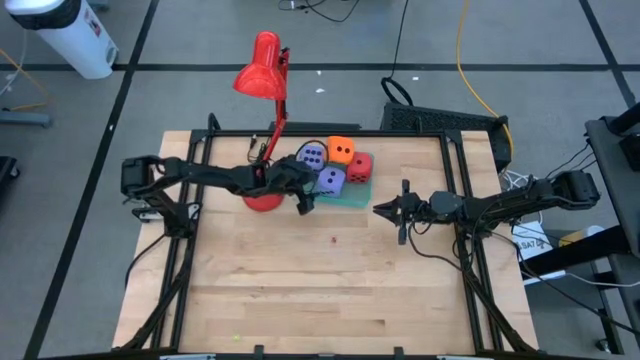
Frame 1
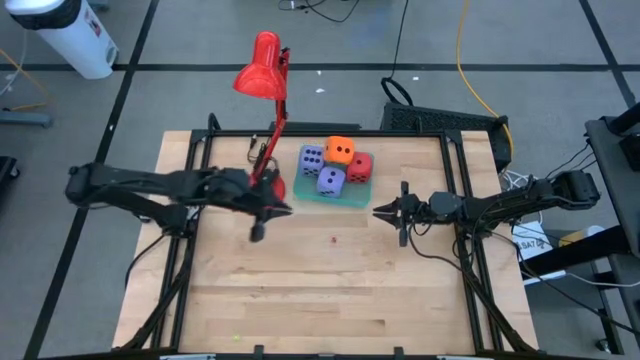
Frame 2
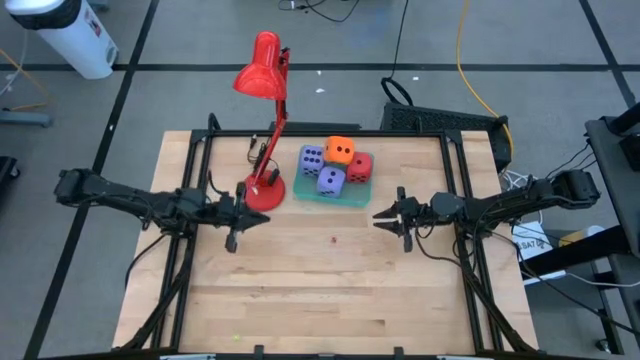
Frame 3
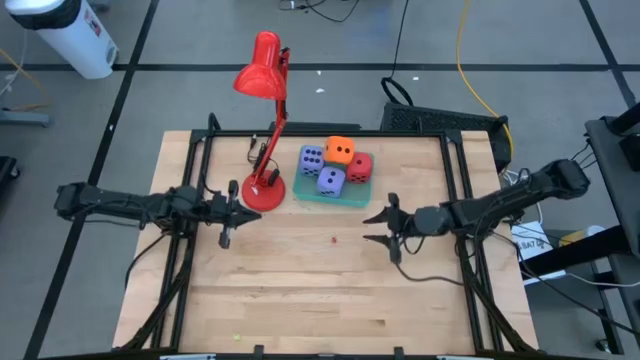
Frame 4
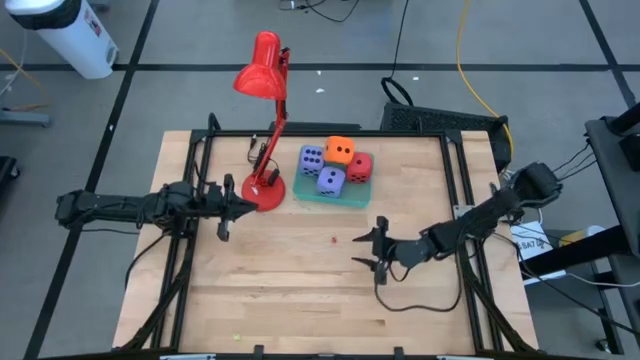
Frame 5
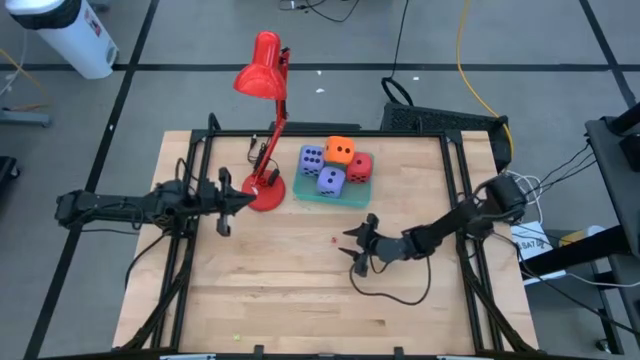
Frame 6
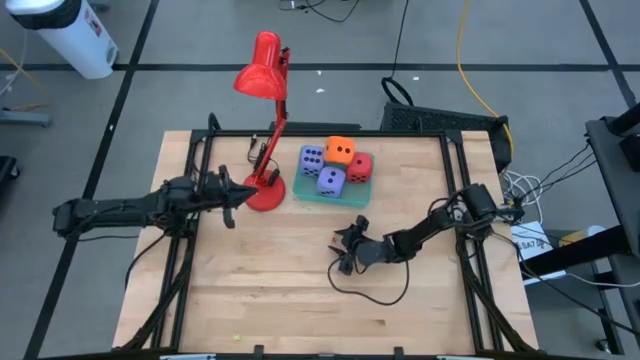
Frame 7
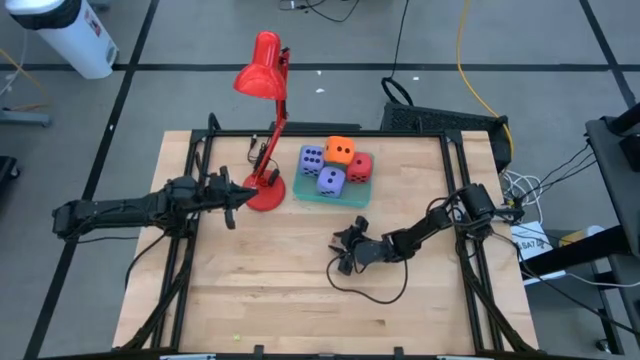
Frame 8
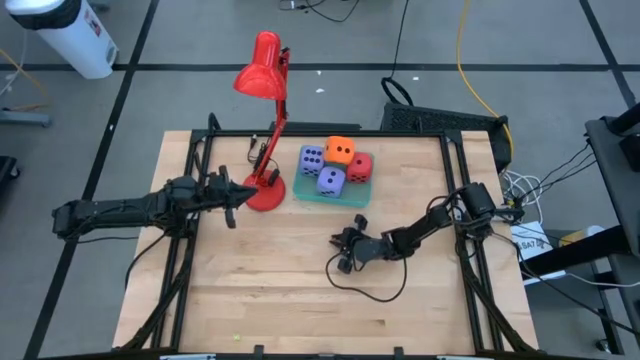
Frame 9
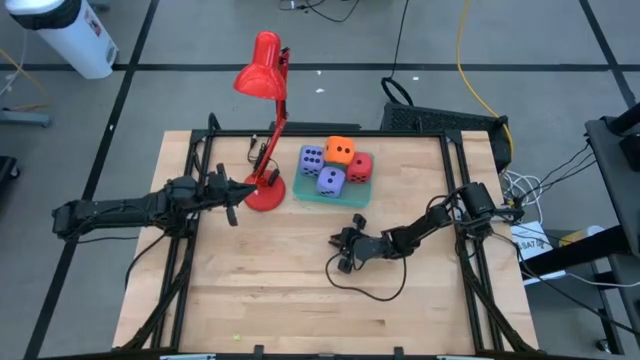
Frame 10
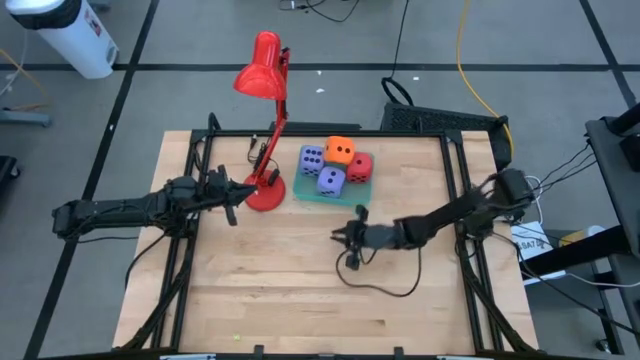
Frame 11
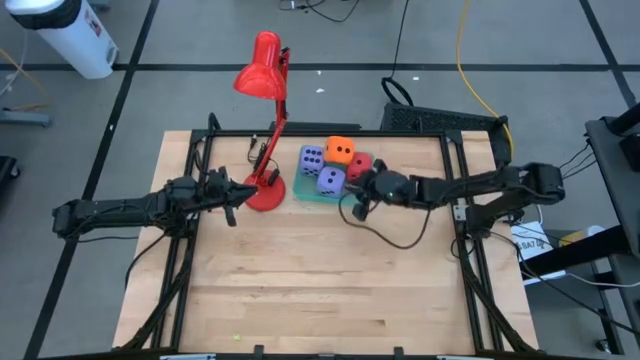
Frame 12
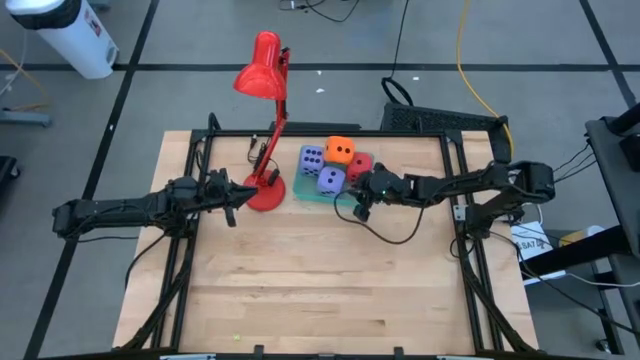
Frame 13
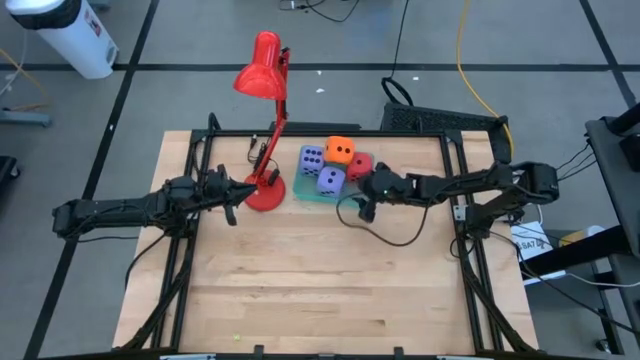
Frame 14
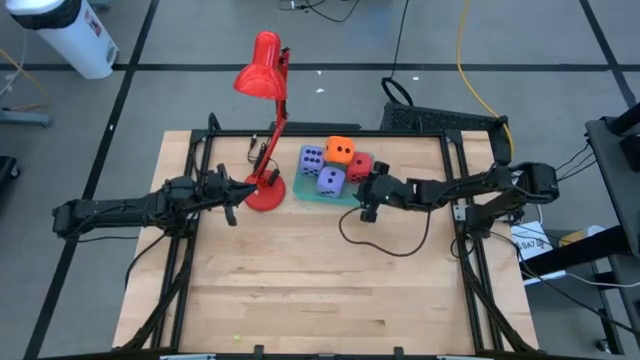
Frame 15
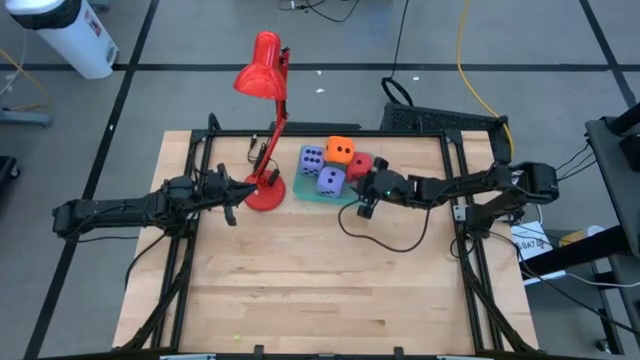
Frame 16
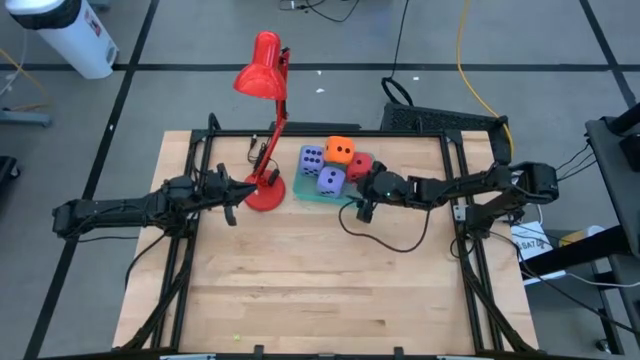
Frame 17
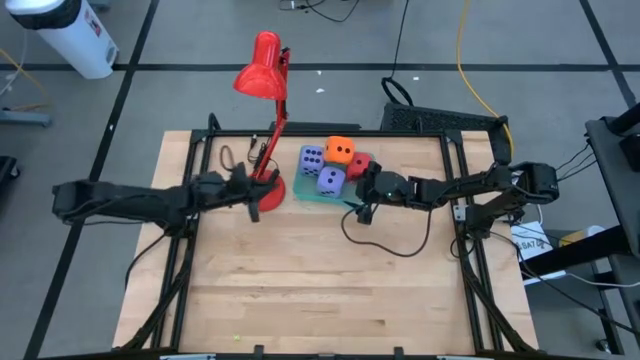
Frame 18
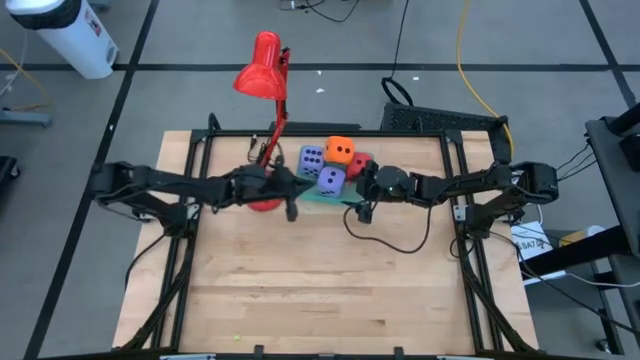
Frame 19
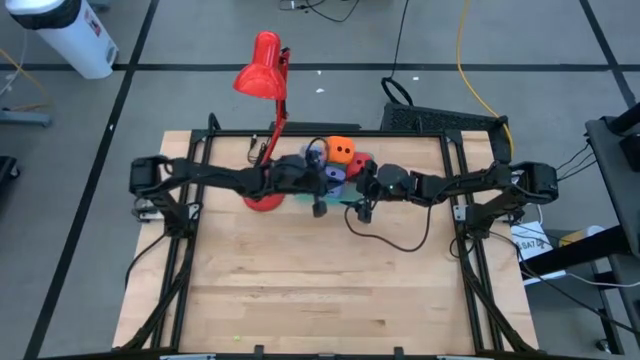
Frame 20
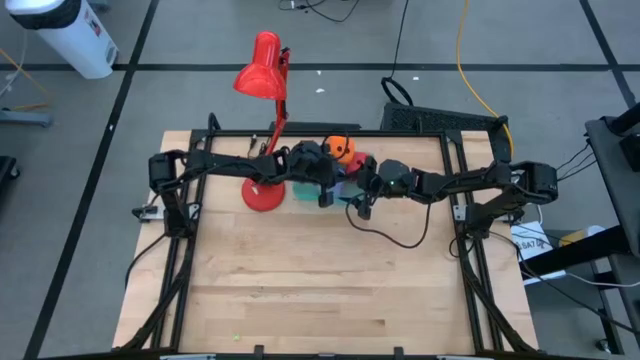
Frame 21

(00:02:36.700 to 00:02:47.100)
Task: Pick & Place Dice
Put the small red die into the blue bin

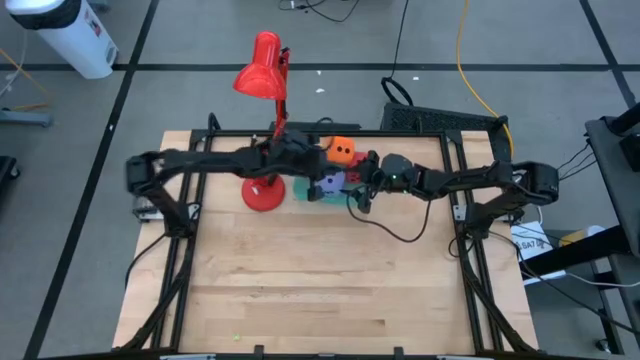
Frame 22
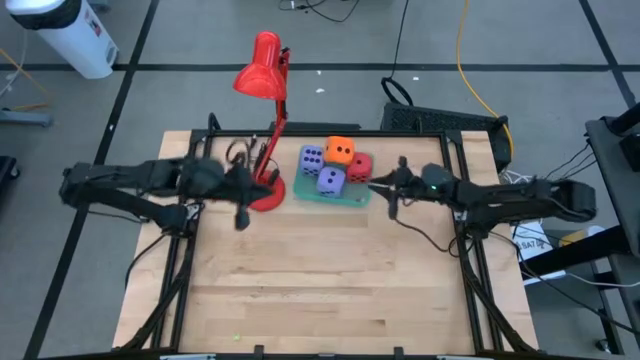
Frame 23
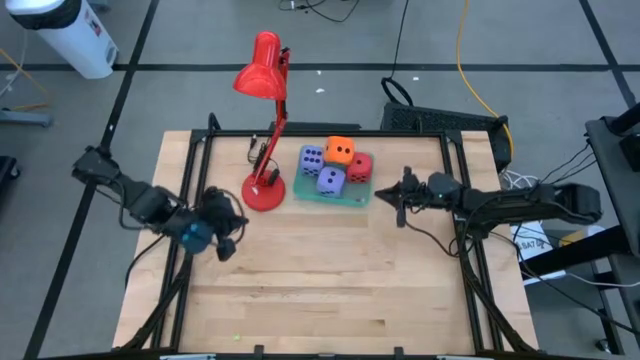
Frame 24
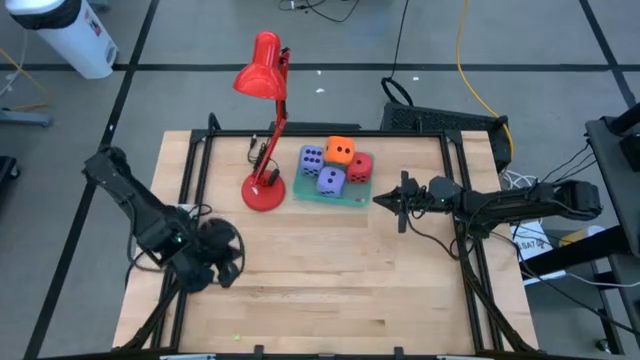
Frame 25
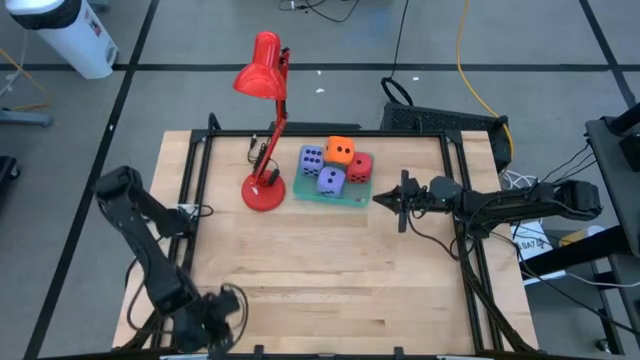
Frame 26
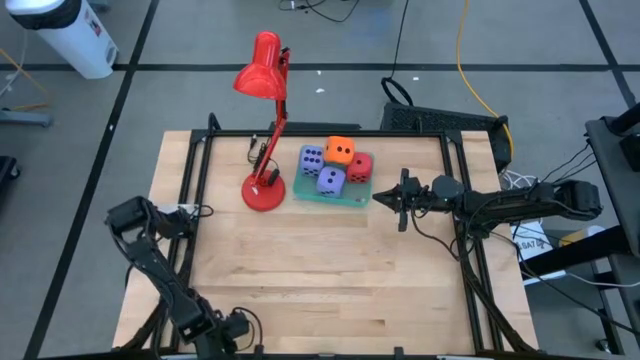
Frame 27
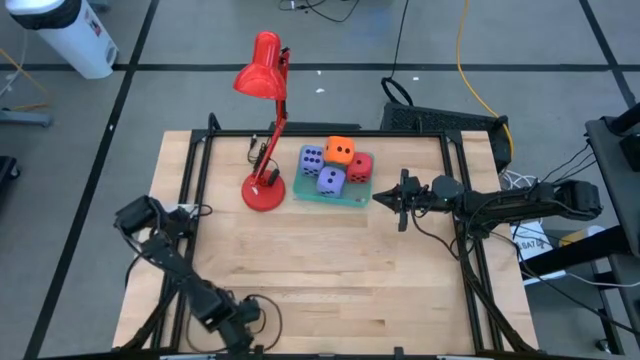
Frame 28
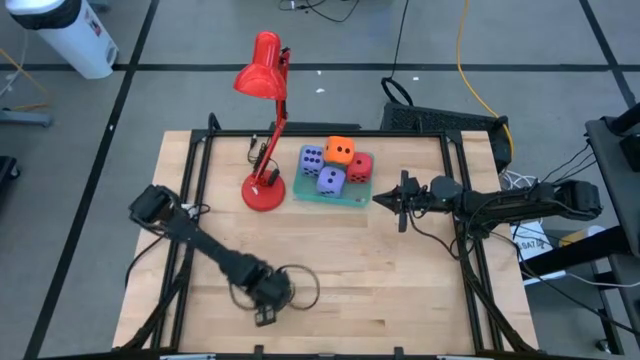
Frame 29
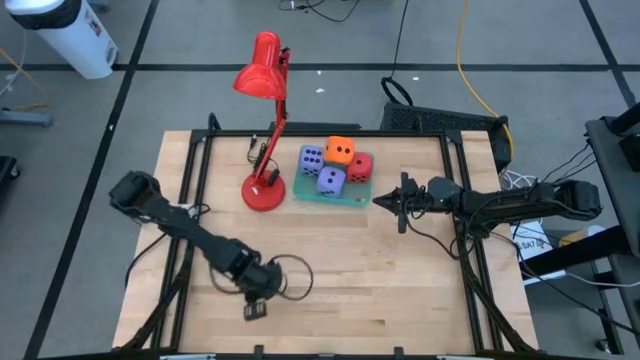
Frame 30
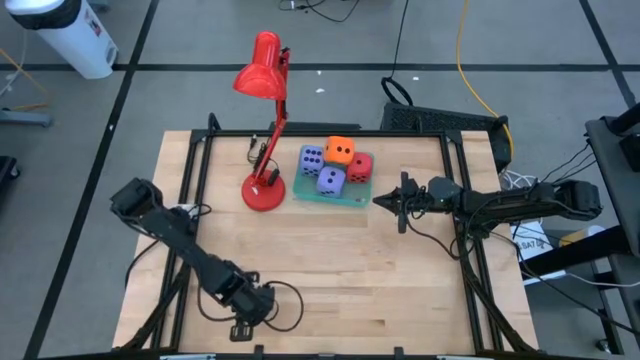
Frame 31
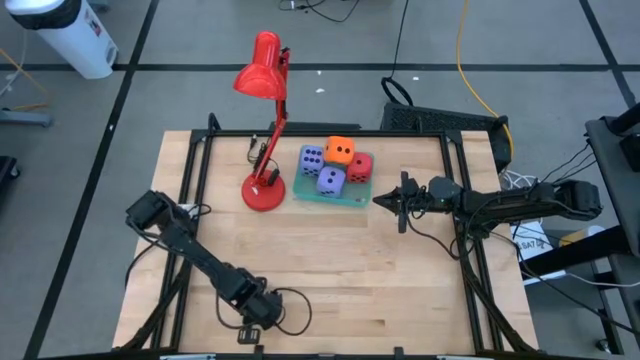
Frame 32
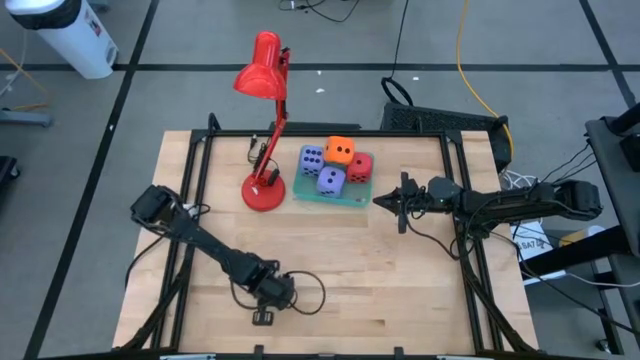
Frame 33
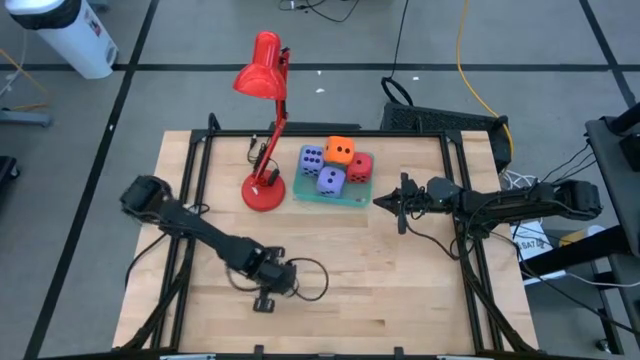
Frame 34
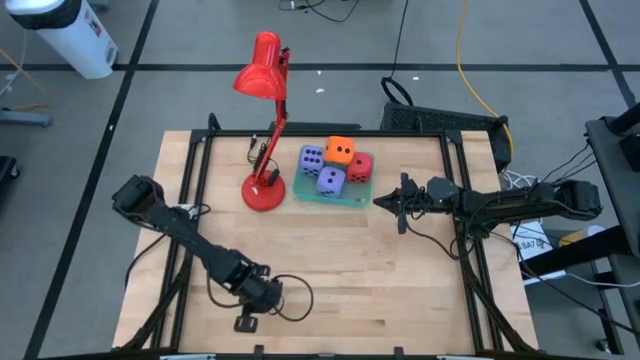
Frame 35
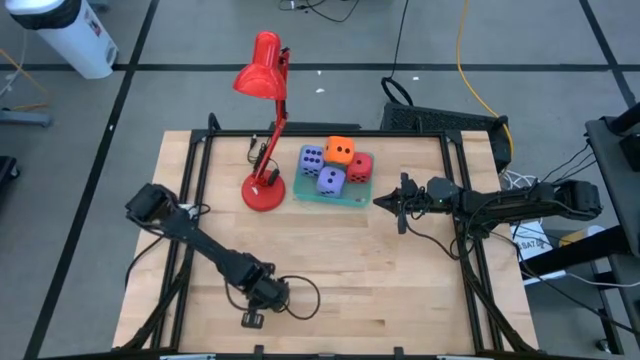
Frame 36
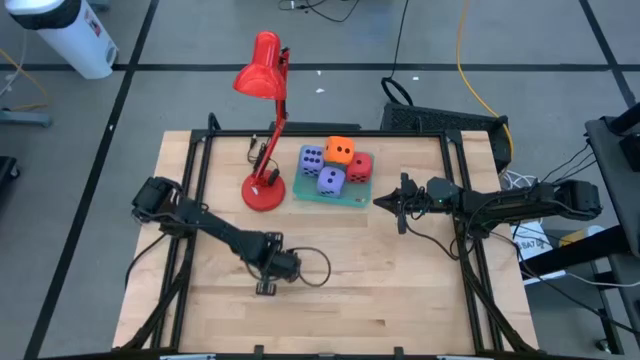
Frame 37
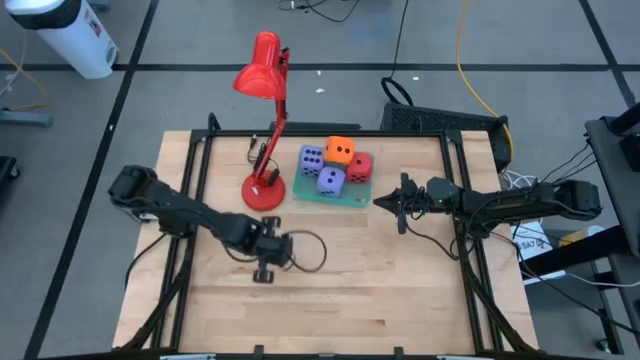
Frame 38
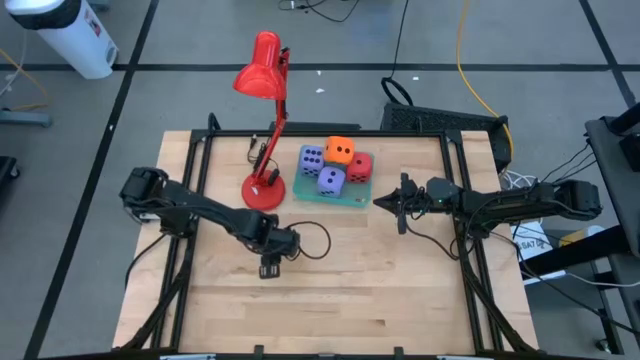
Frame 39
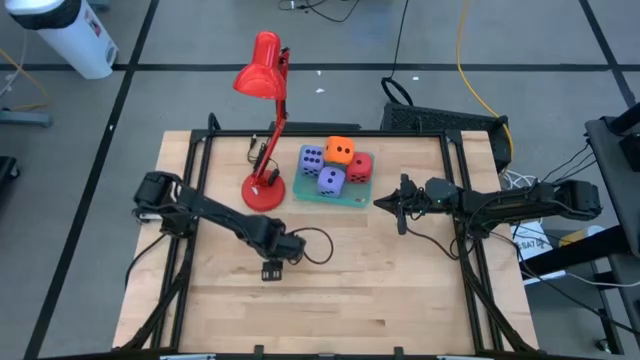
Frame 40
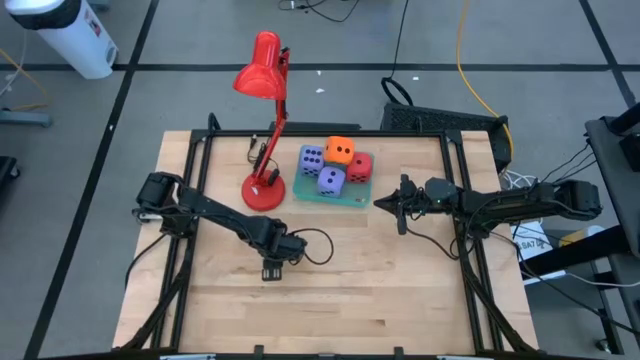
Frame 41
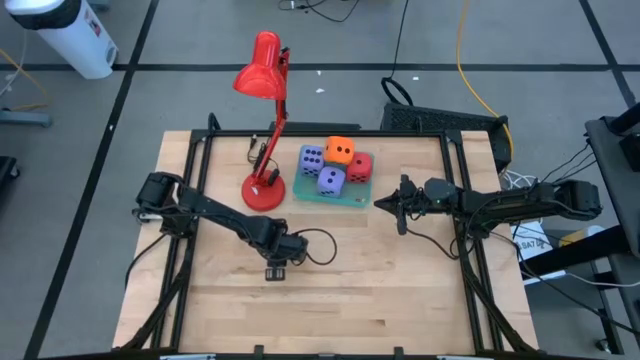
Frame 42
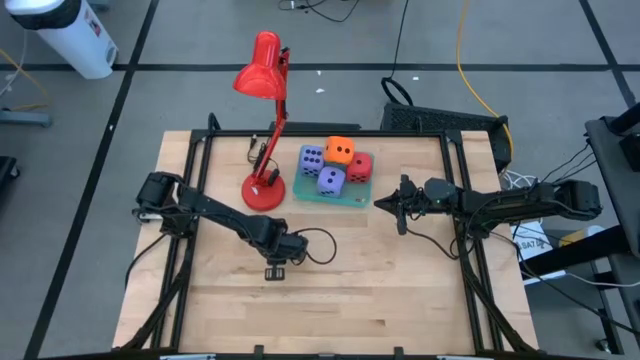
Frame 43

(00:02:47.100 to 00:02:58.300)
Put the small light green die into the blue bin
